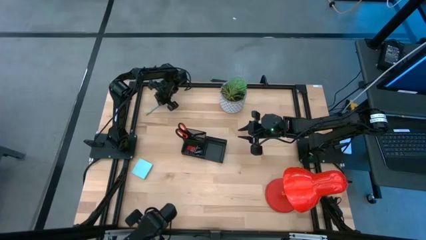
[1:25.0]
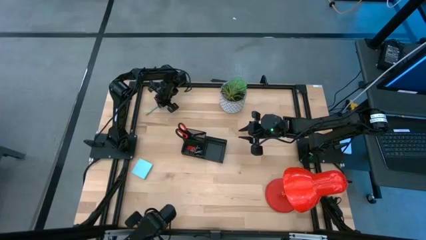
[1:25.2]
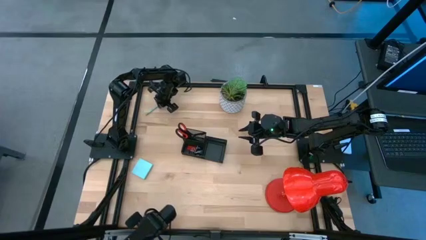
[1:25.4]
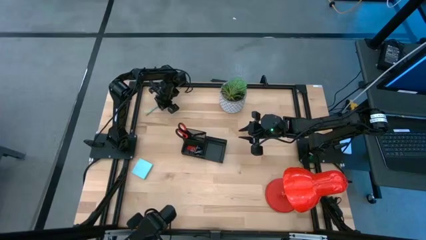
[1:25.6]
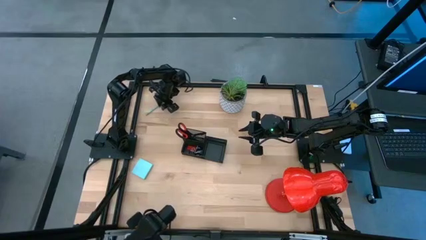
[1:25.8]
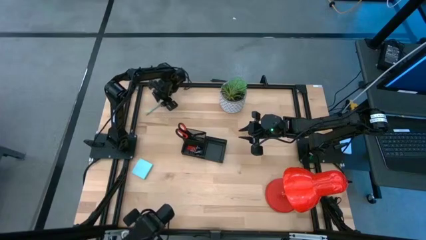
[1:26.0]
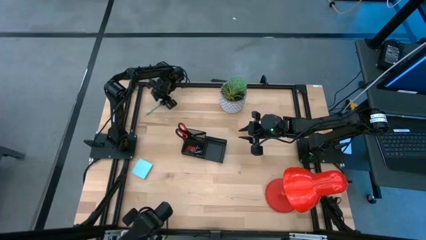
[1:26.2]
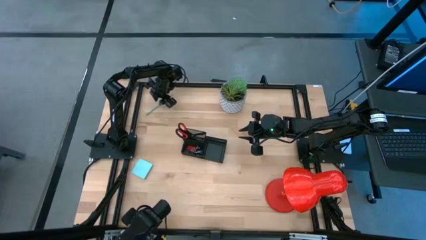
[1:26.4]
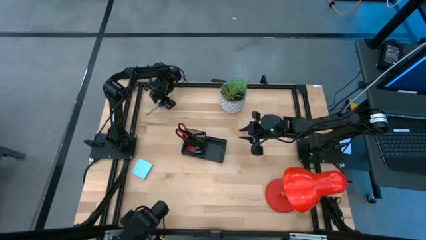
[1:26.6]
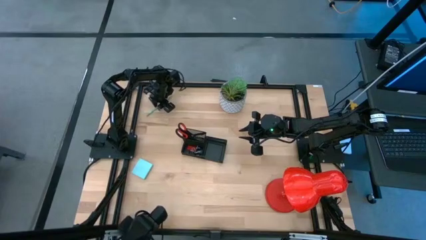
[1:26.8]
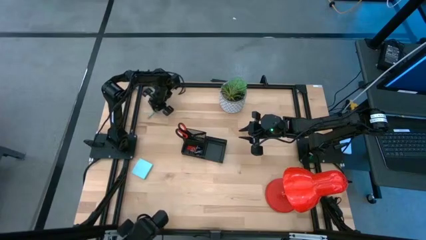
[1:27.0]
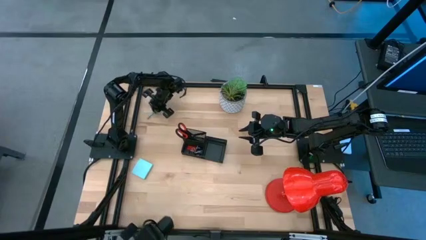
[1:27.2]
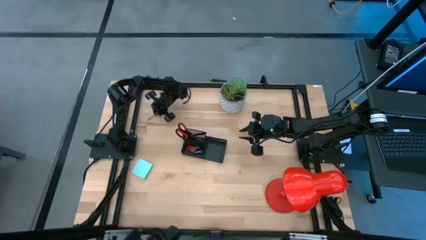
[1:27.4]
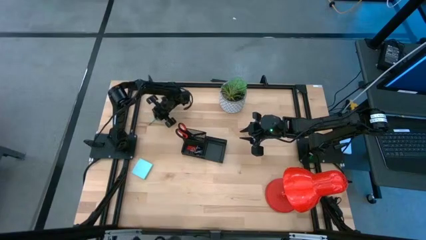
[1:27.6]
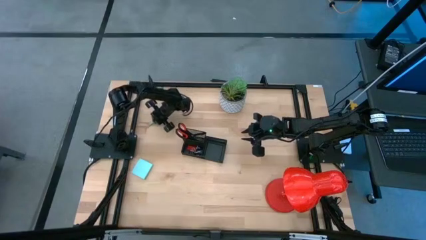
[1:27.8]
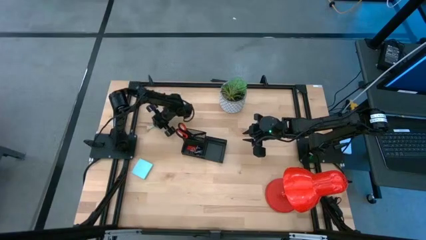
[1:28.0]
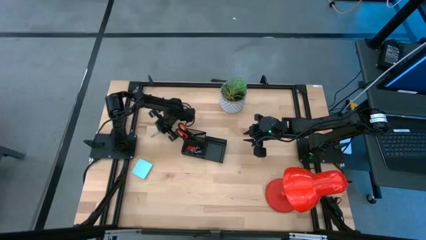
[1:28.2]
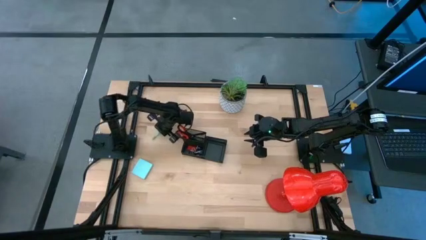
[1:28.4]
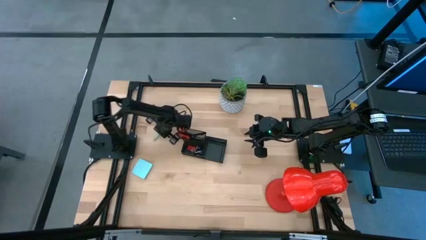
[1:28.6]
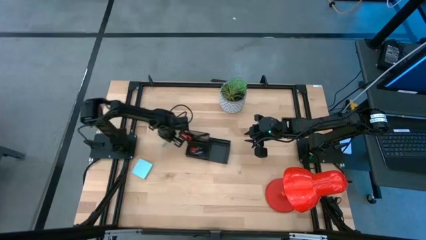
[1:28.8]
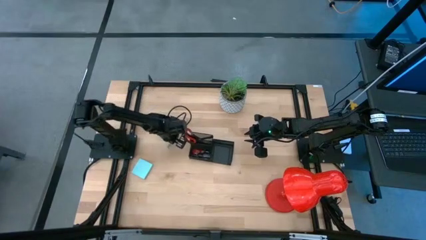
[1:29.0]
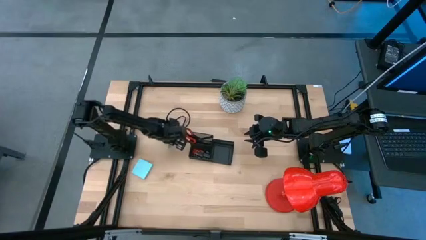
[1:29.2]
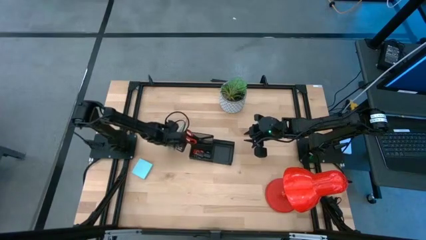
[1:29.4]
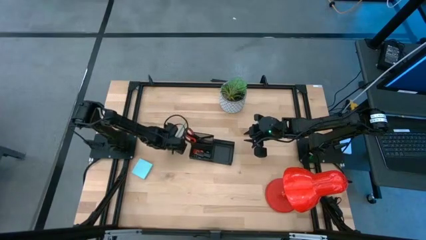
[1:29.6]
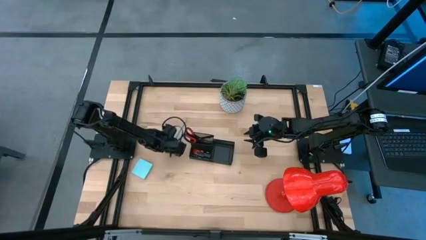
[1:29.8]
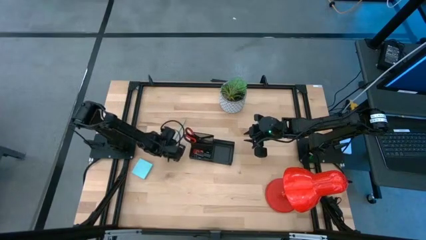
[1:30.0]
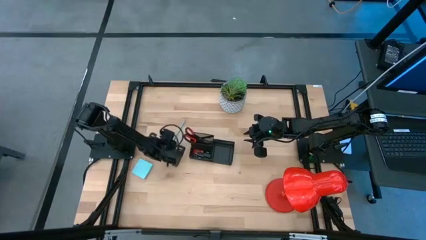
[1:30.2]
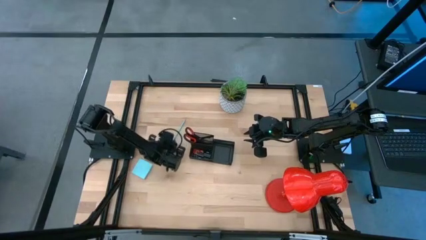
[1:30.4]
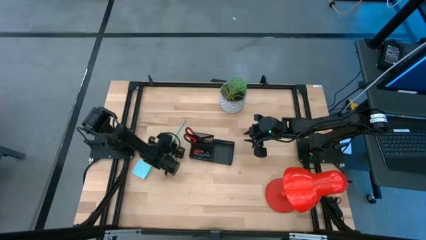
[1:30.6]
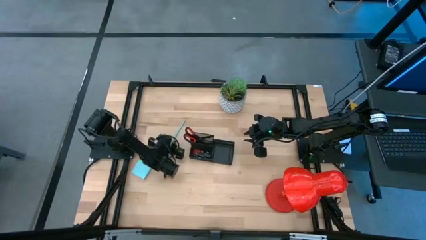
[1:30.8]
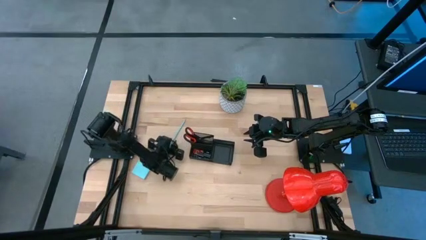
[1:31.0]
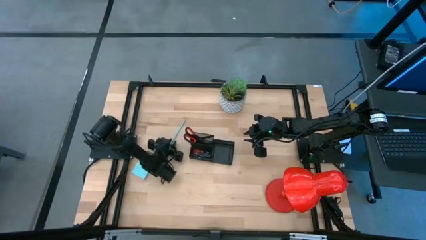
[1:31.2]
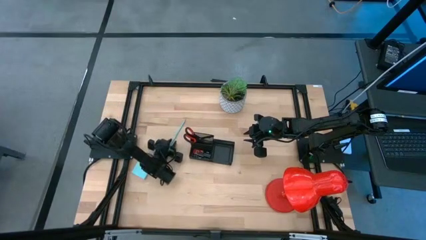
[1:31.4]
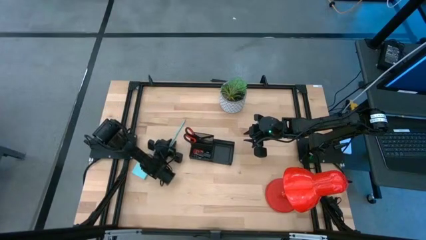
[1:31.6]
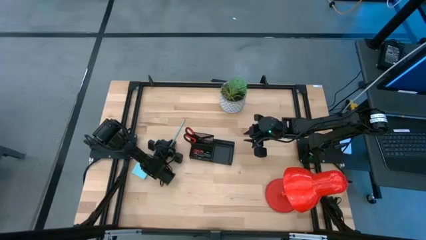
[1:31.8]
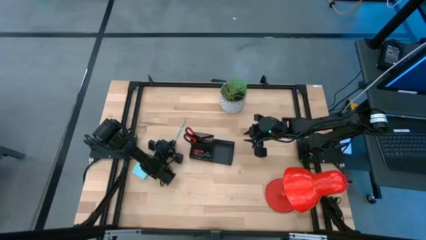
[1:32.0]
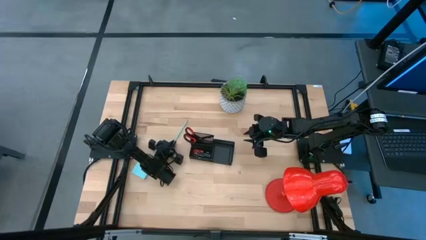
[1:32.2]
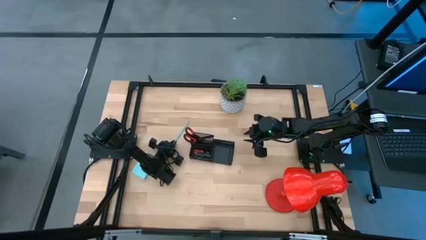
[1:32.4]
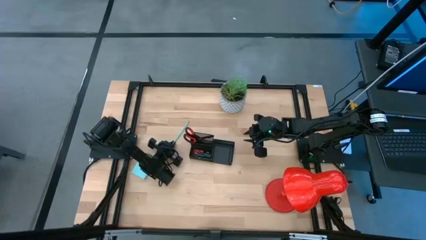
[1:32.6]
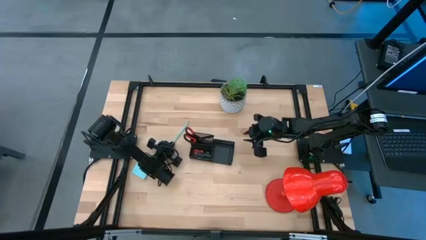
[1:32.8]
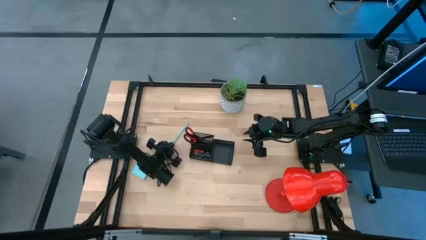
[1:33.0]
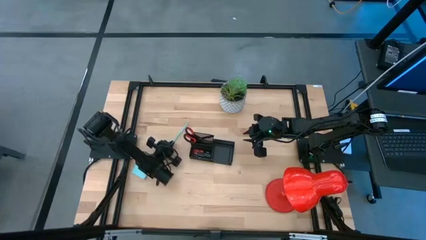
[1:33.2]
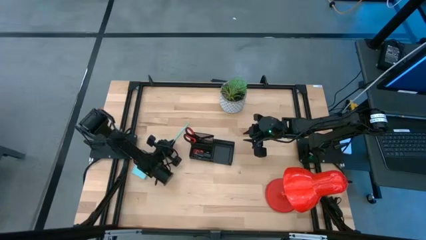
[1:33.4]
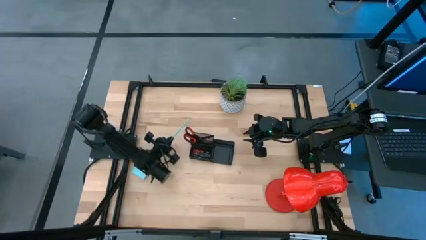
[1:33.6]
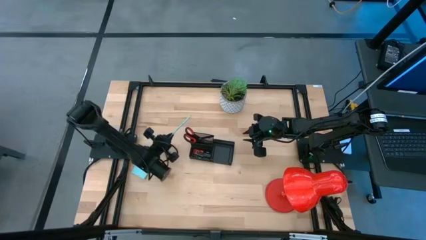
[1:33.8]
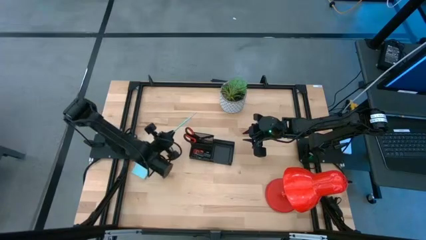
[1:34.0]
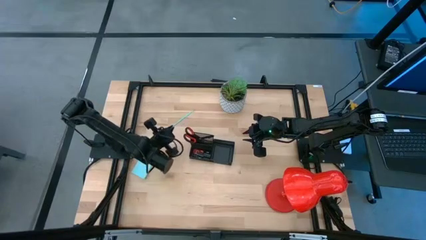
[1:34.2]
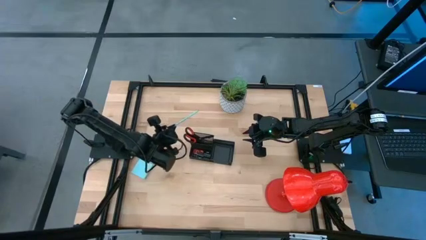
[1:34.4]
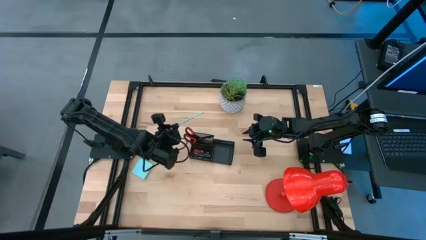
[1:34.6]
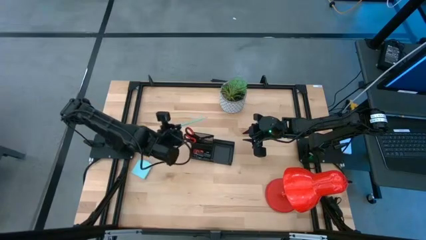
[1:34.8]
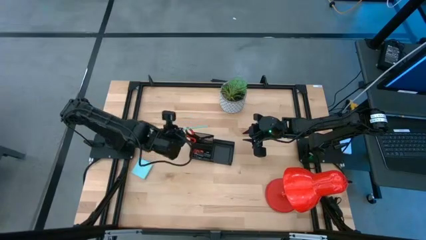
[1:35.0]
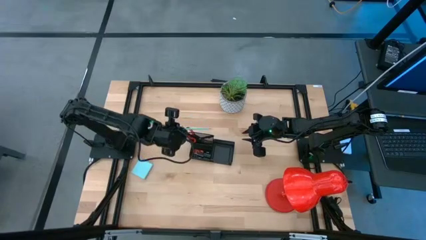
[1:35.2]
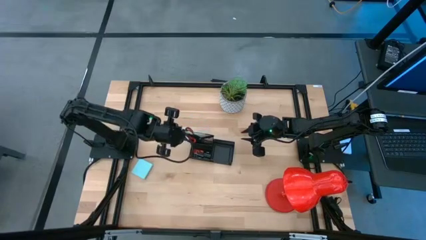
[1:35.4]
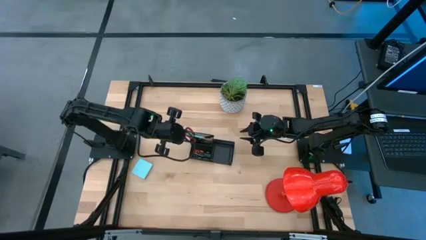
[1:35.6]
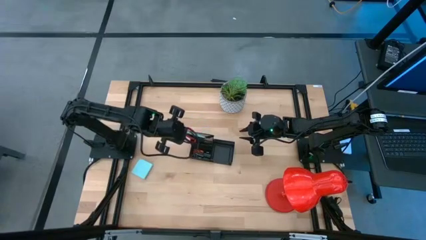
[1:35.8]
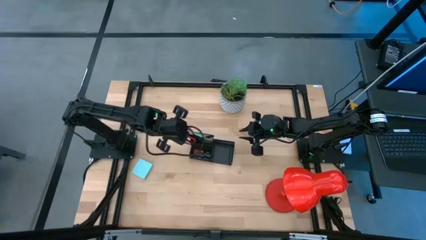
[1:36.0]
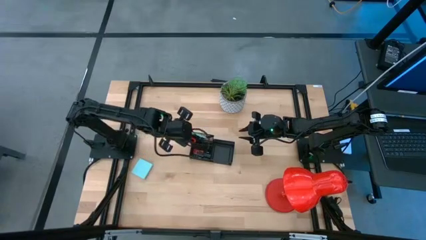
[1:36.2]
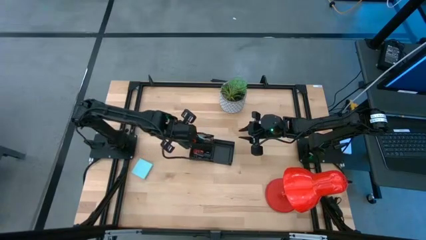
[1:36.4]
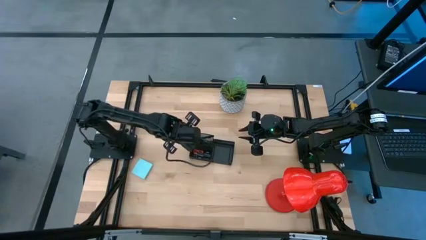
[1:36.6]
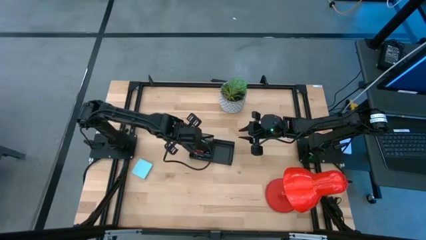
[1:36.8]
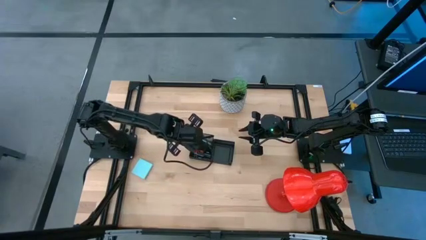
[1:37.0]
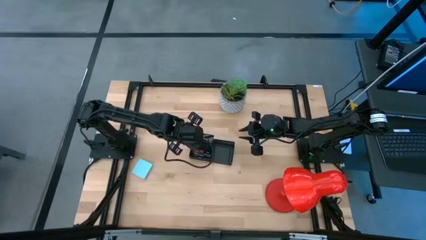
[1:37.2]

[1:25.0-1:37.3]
Task: Pick and place office supplies into organizer
Put the pencil into the top left section of the desk organizer

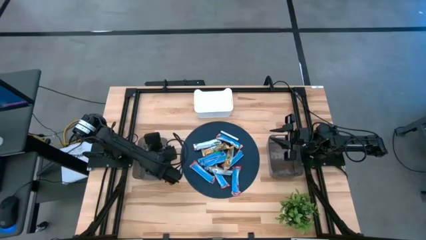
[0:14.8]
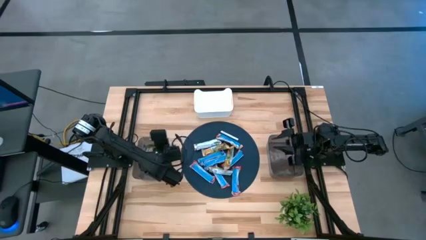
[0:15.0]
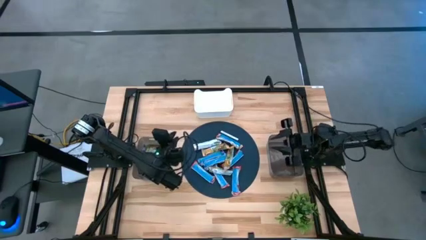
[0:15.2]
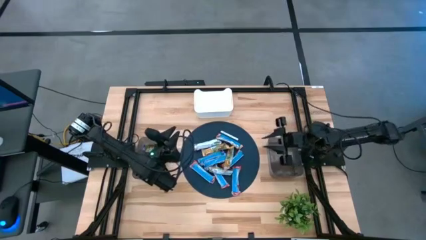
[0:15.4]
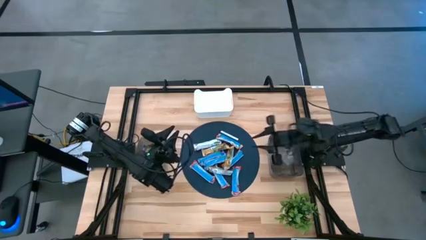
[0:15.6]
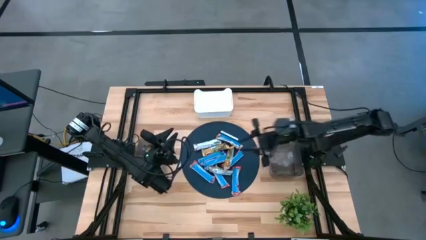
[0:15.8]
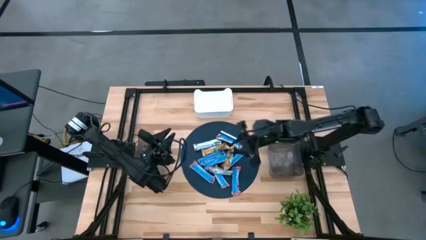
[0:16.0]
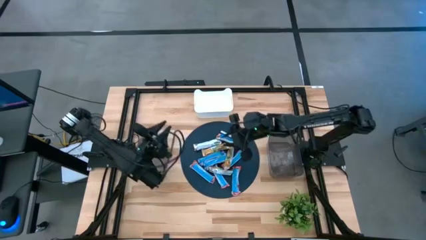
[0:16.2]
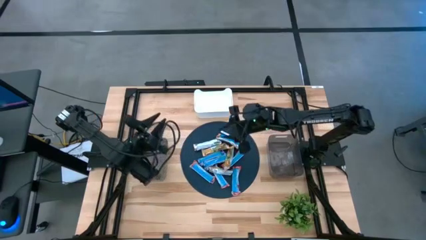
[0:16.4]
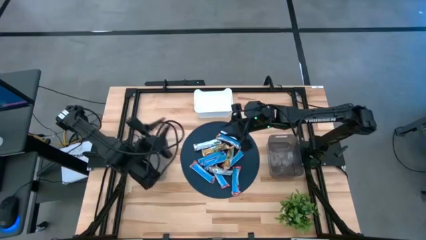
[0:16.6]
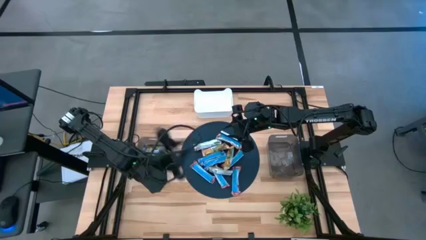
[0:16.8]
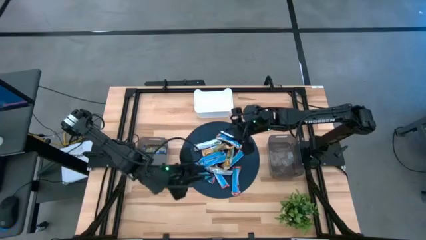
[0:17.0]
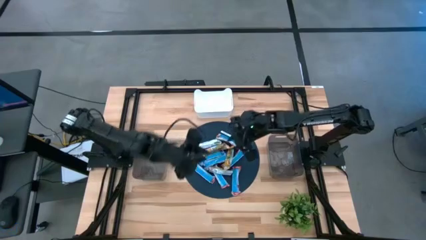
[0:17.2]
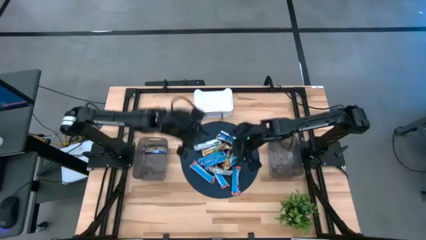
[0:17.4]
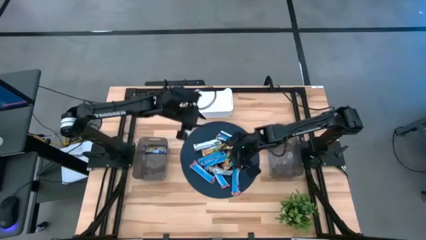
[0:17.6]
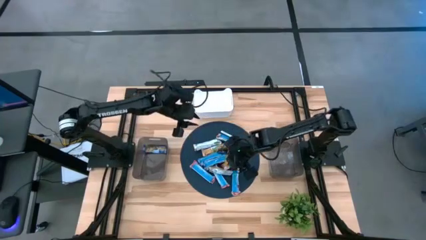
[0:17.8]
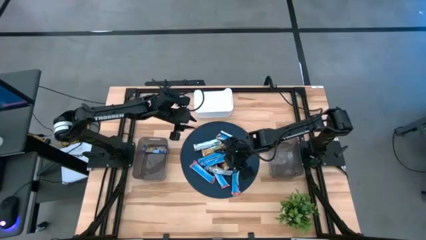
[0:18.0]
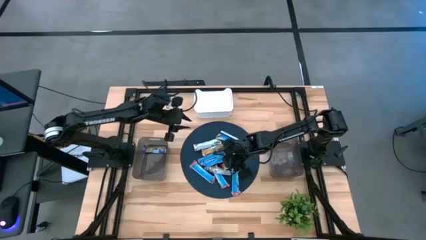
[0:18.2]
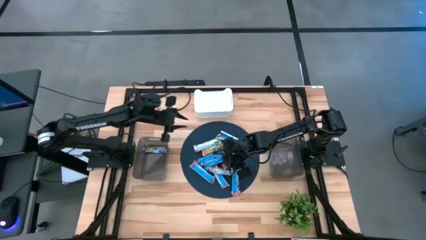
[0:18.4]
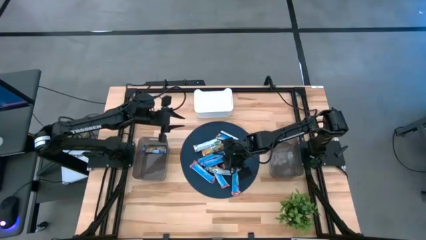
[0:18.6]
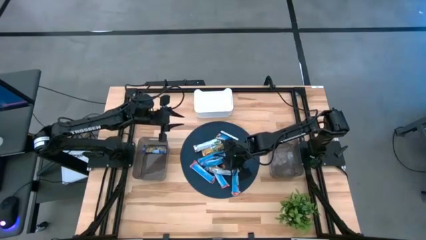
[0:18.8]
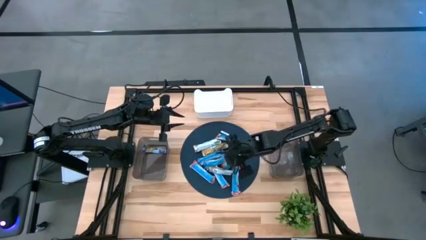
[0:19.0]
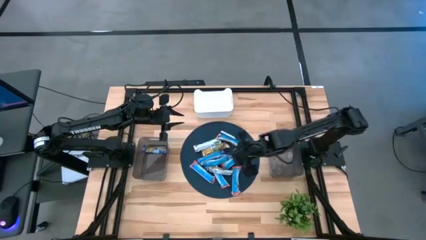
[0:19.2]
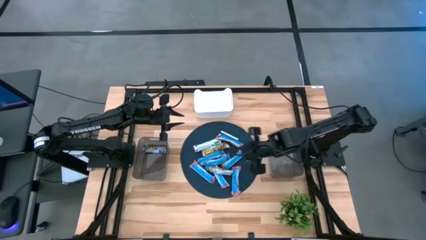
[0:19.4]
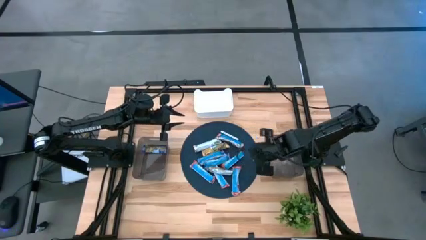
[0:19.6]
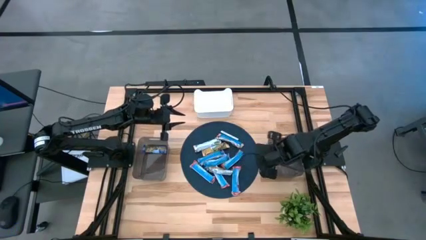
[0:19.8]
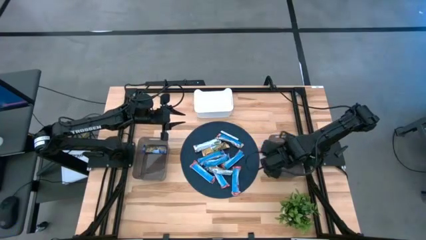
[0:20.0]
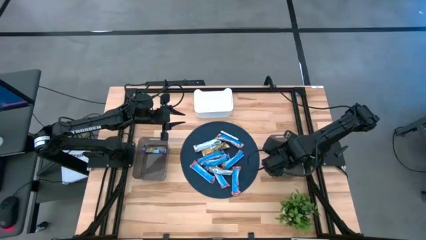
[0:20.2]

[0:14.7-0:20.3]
Task: Pick and place Granola Bars by type
Put the orange granola bar into the right black bin
